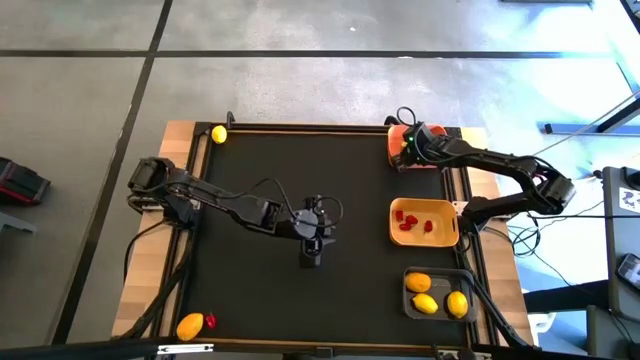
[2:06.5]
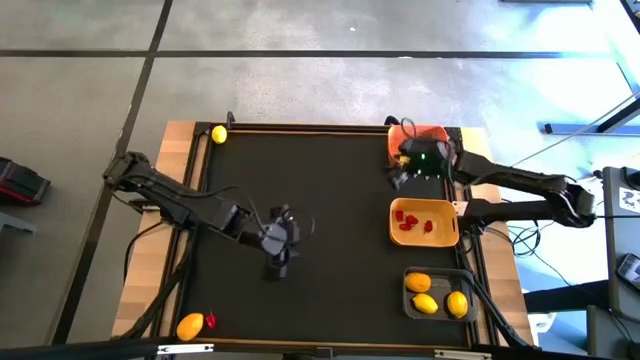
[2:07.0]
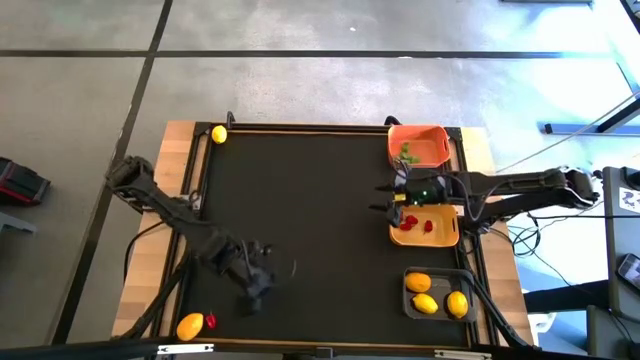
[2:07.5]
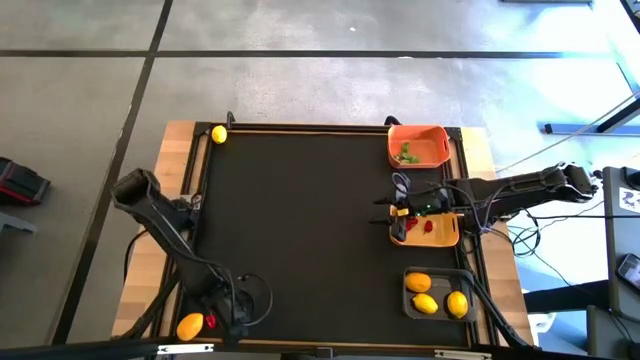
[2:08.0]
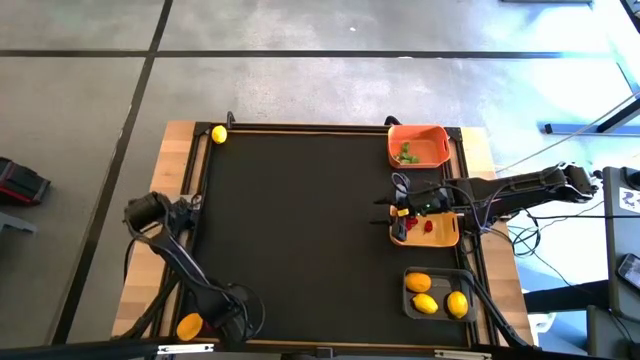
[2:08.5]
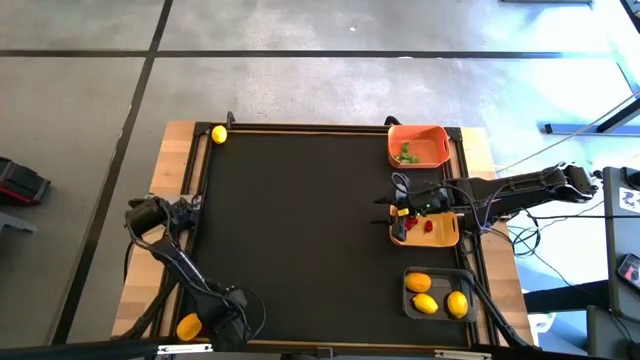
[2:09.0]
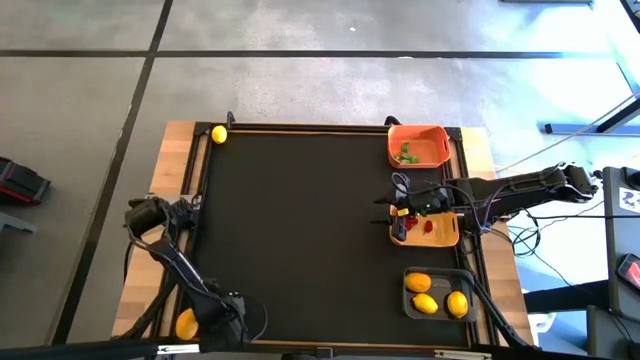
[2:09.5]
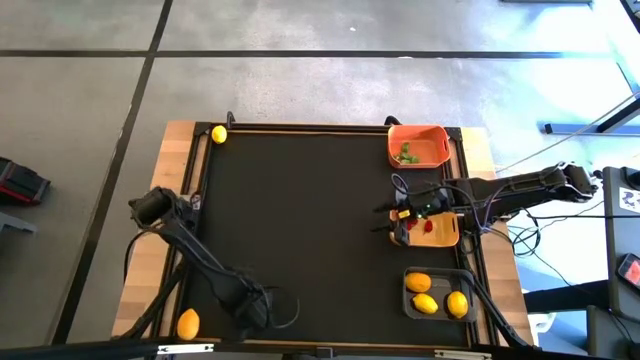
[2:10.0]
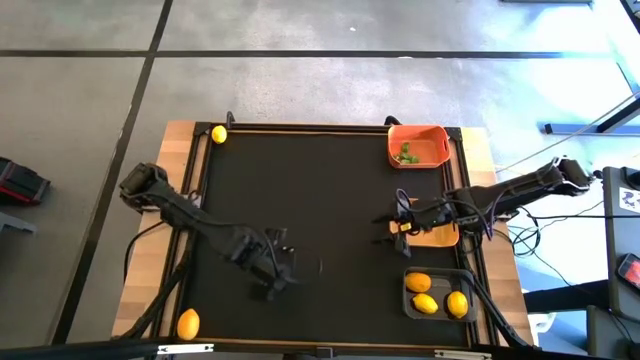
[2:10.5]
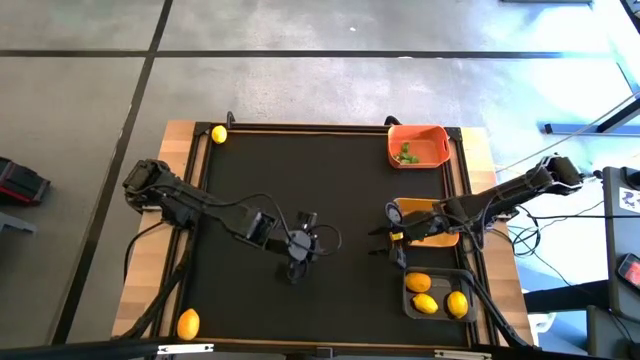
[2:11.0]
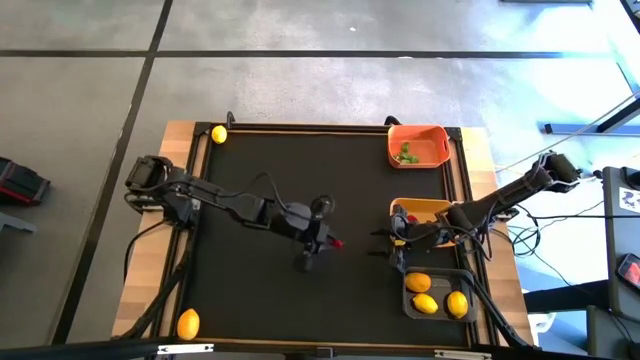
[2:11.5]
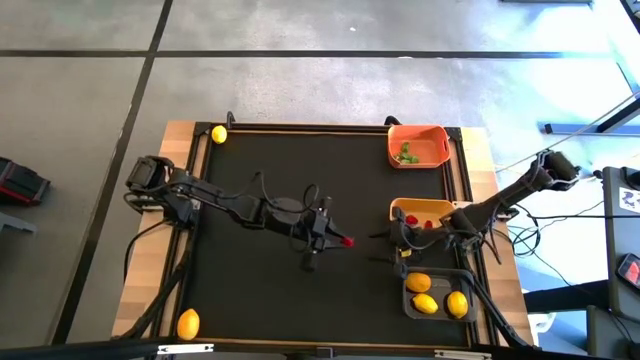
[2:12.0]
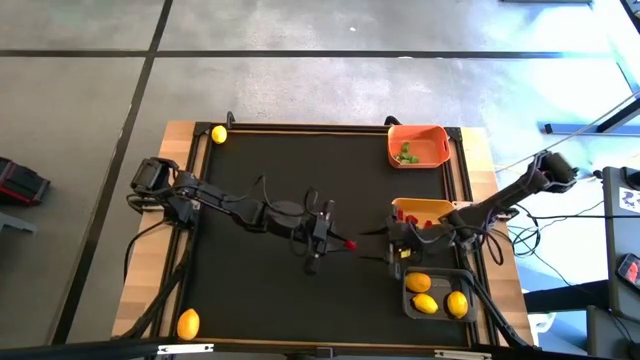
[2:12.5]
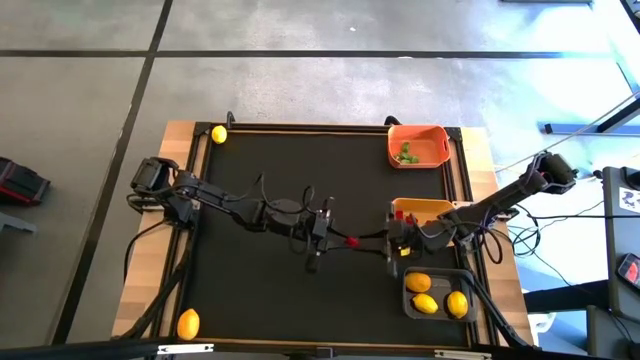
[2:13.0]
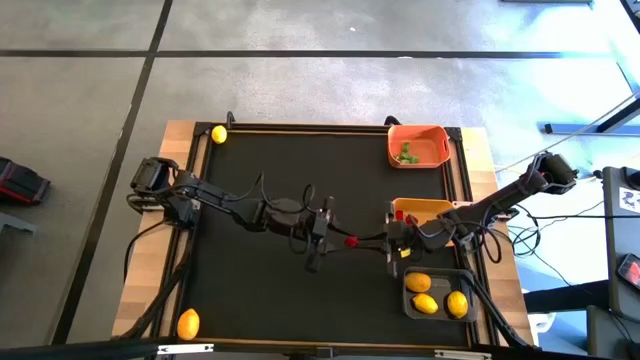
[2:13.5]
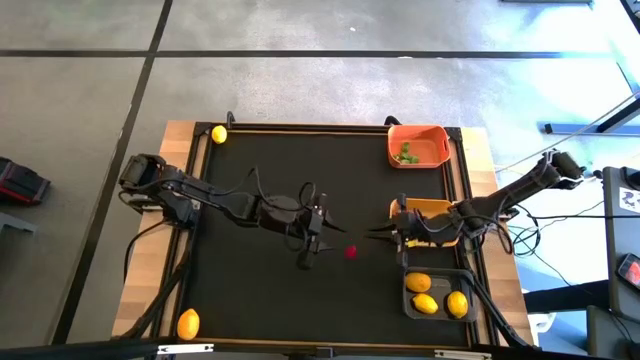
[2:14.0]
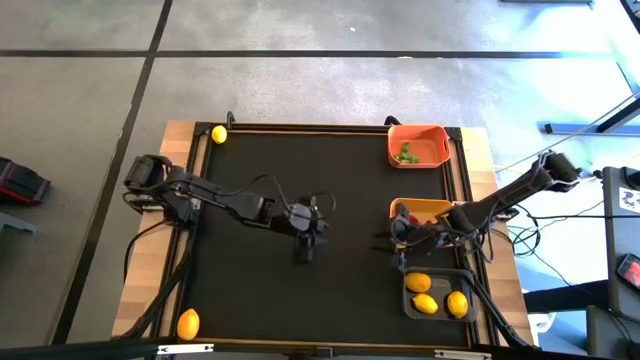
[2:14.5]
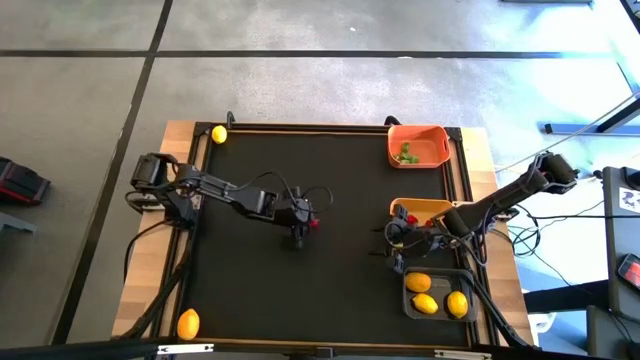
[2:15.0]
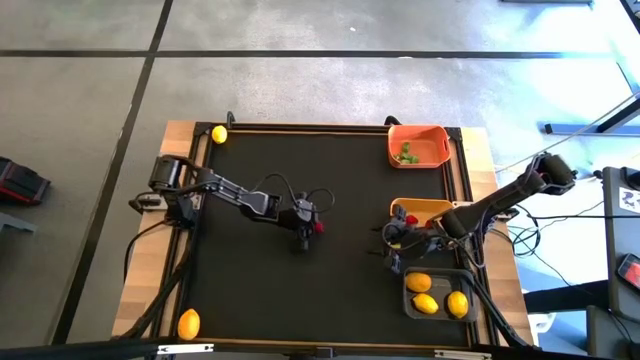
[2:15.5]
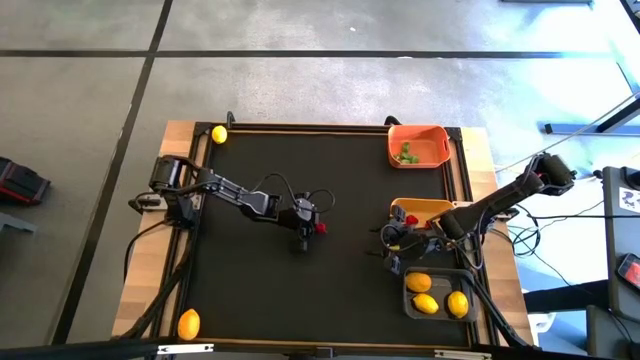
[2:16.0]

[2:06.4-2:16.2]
Task: Sort produce into baskets
Put the red chili pepper into the yellow bin

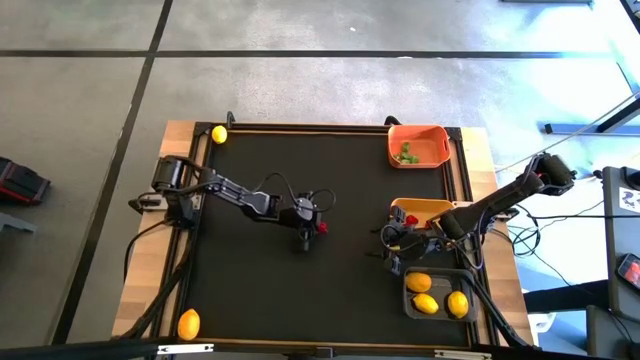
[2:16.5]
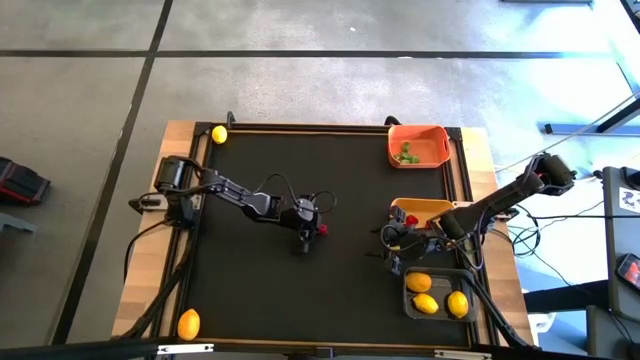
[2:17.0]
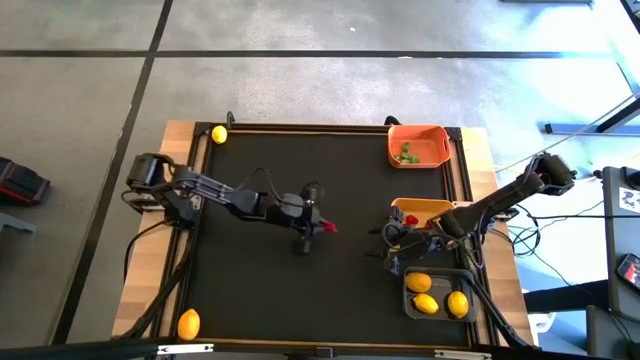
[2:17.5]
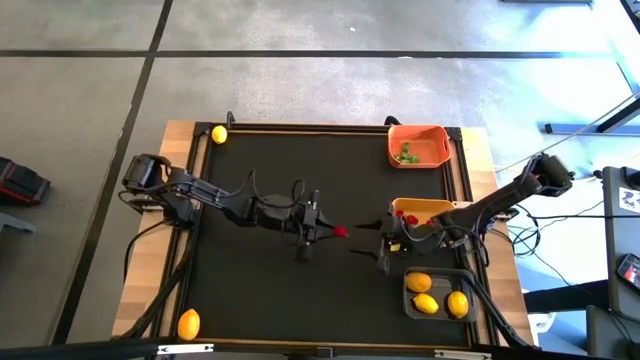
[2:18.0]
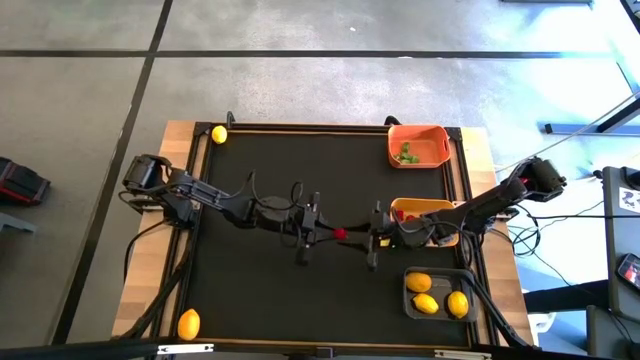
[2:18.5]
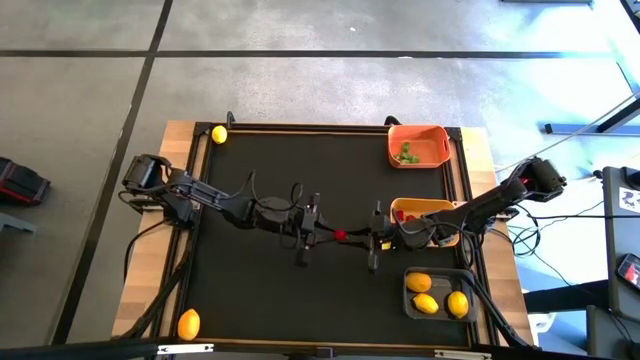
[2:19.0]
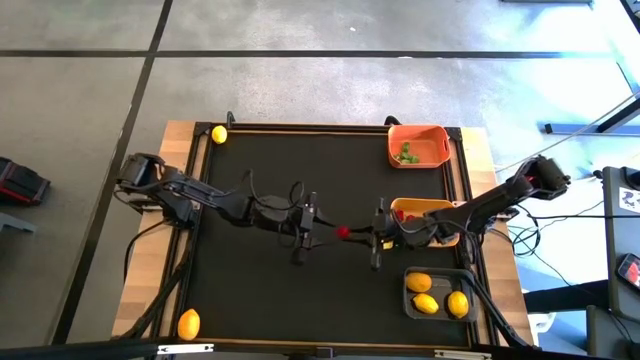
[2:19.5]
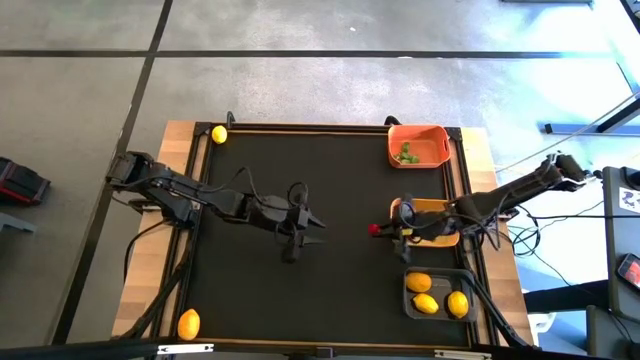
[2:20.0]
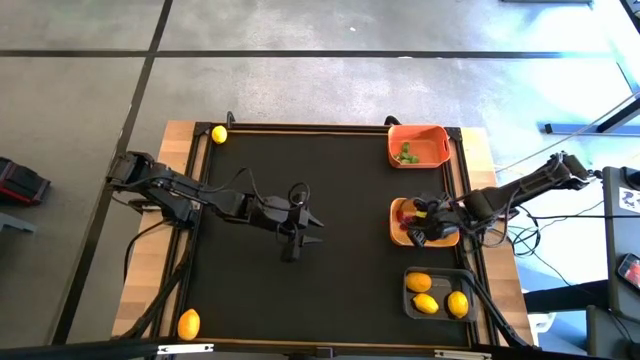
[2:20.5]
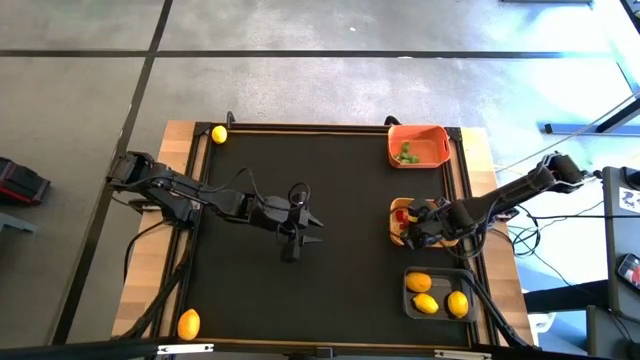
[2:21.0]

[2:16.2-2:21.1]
Put the red chili pepper into the yellow bin

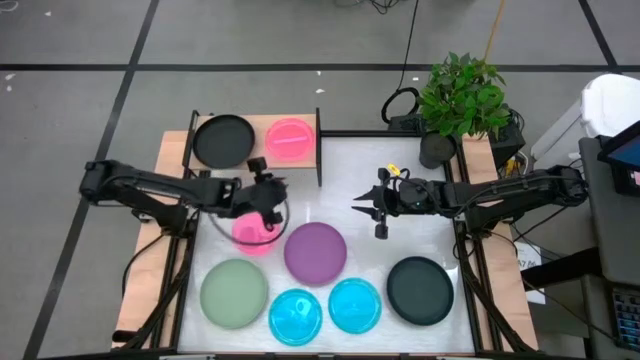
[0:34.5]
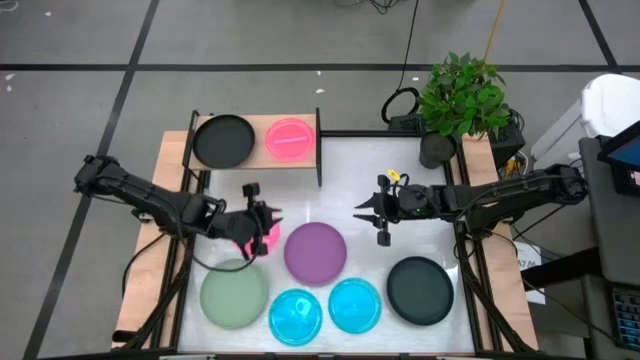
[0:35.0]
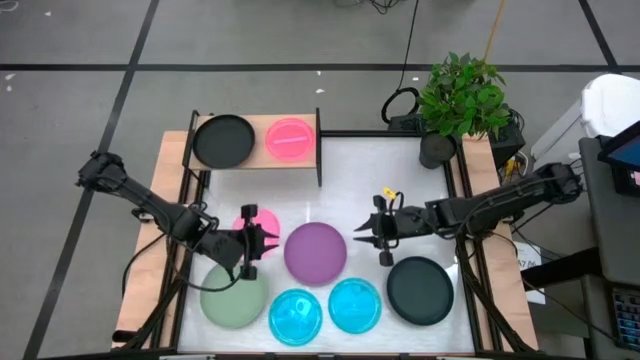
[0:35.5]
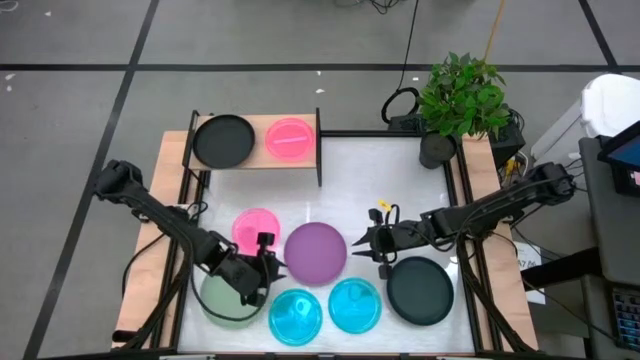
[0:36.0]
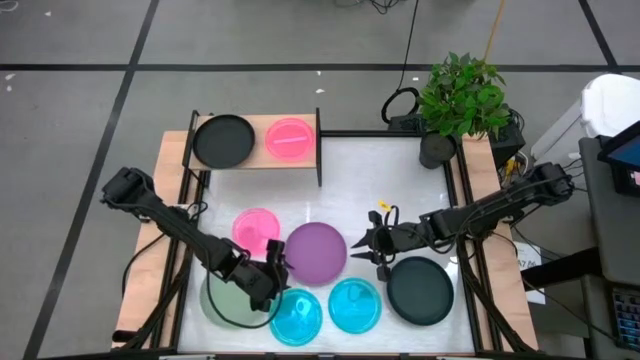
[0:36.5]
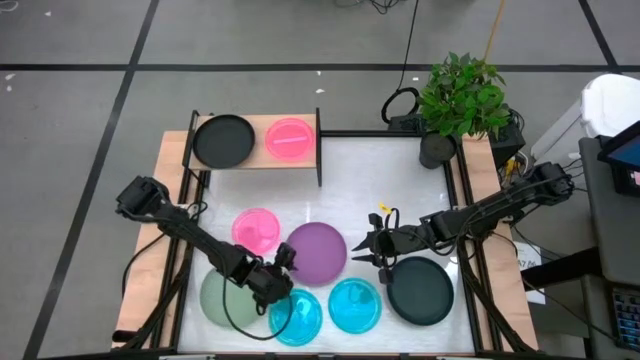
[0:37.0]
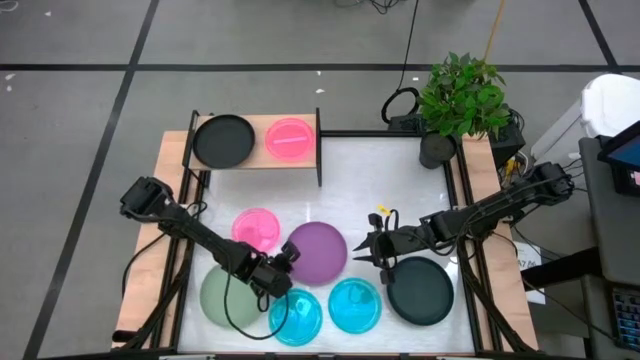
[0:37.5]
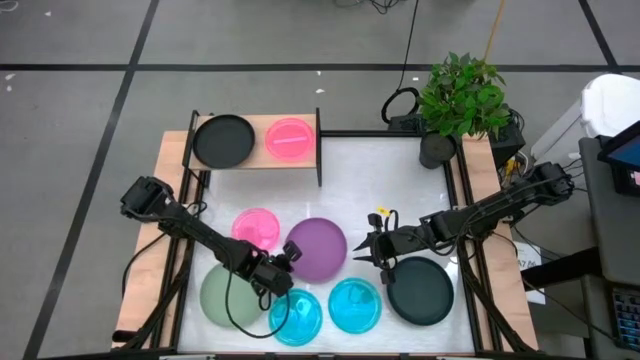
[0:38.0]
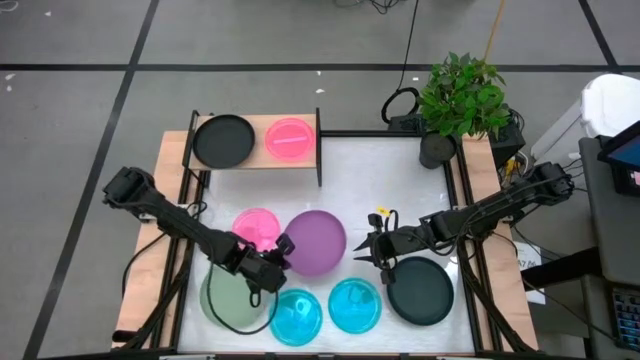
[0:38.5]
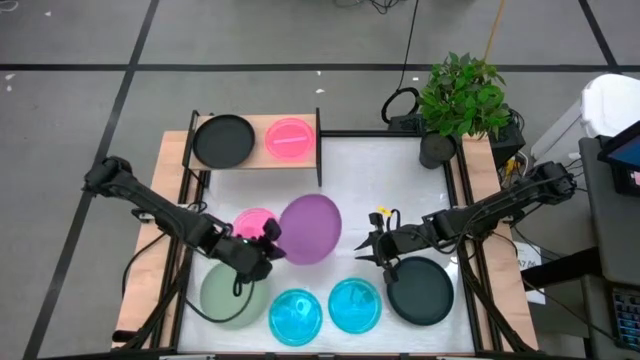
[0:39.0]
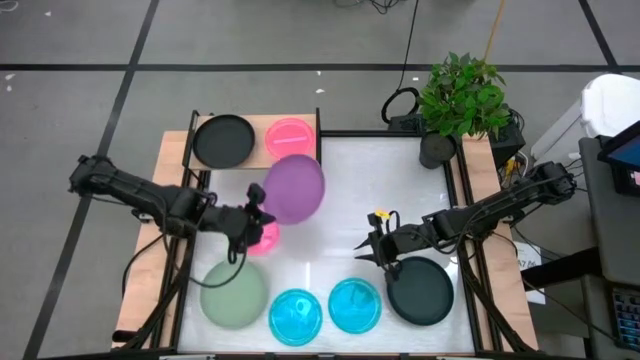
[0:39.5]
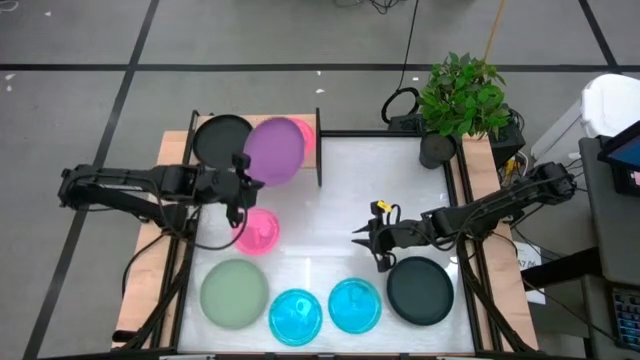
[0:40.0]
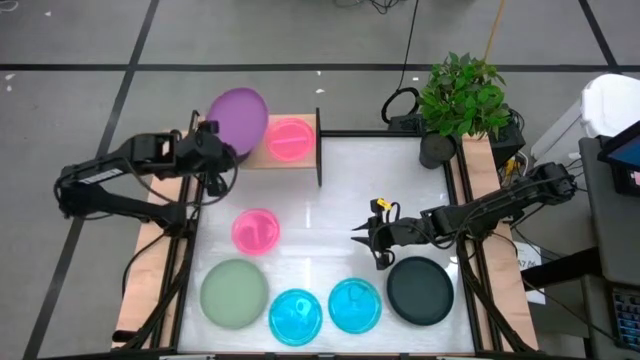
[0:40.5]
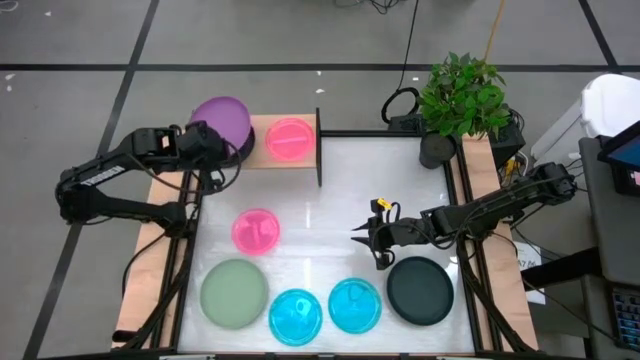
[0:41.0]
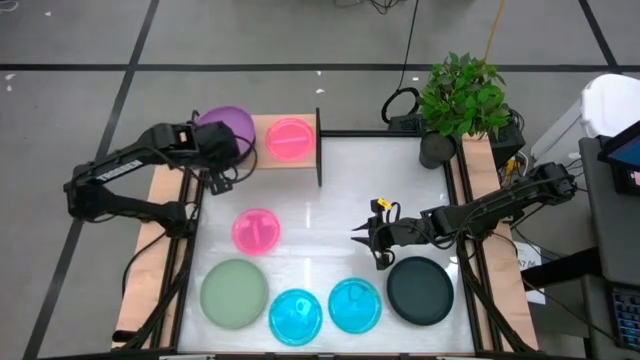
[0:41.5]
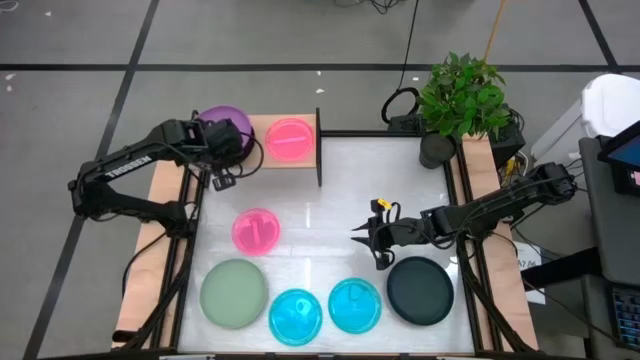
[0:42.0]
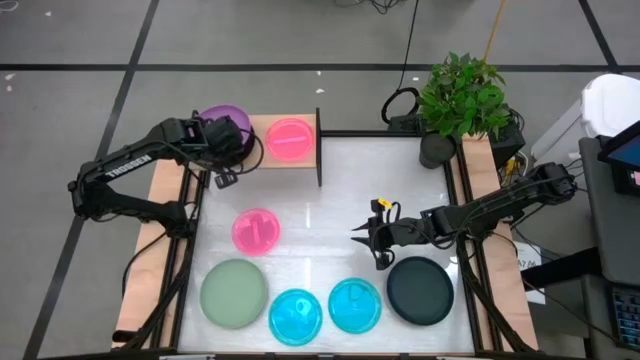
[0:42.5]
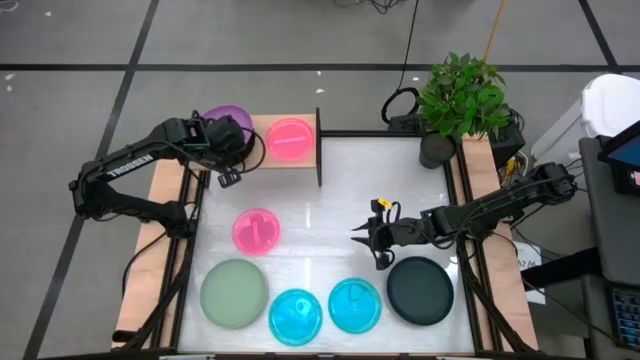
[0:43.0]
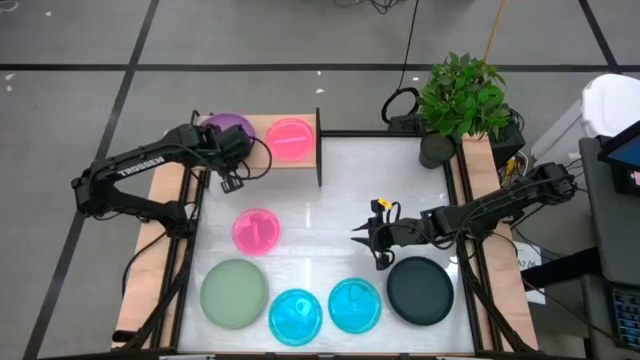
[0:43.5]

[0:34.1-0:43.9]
Task: Place and stack plates onto a shelf
Stack the purple plate on top of the black plate on the shelf
